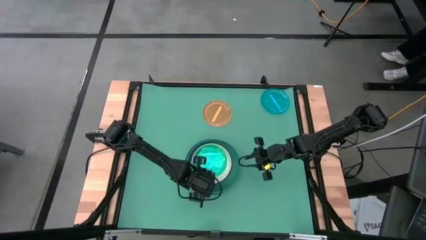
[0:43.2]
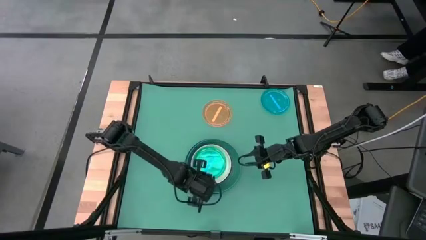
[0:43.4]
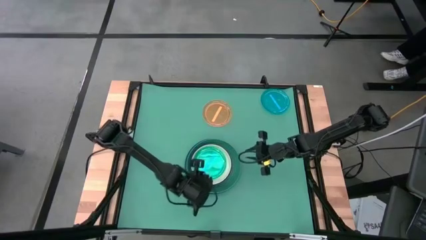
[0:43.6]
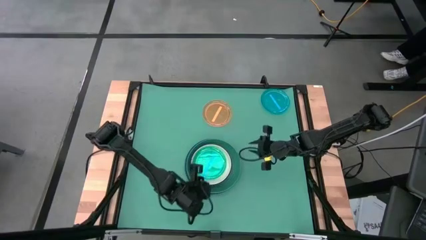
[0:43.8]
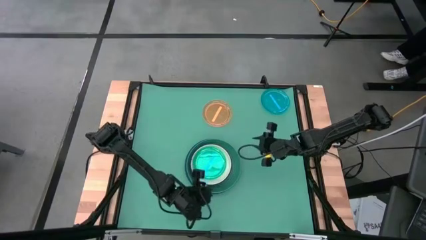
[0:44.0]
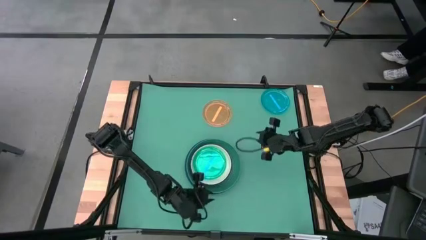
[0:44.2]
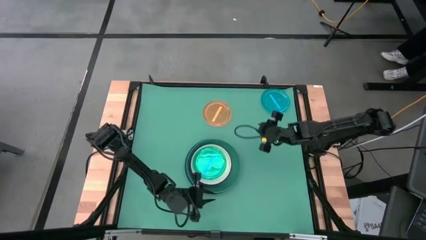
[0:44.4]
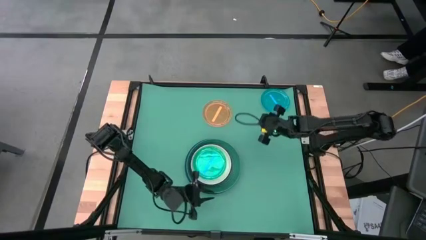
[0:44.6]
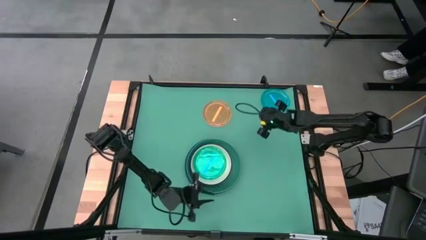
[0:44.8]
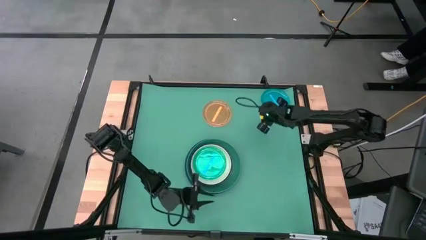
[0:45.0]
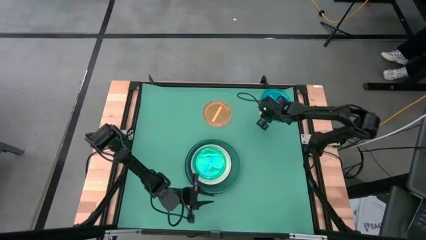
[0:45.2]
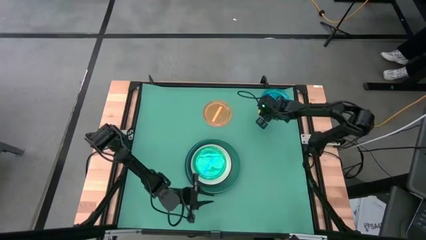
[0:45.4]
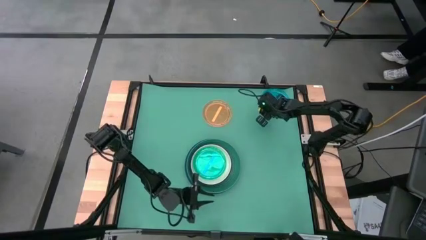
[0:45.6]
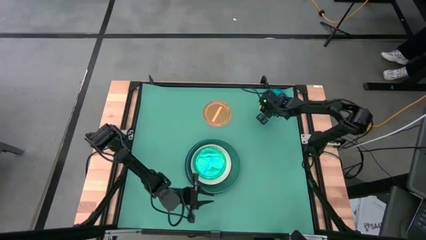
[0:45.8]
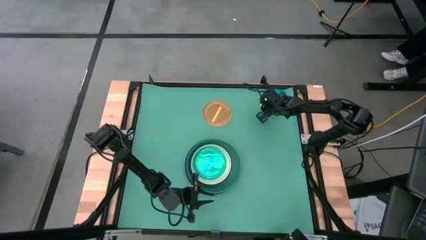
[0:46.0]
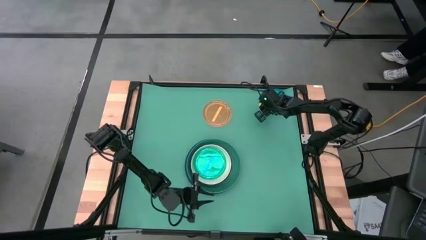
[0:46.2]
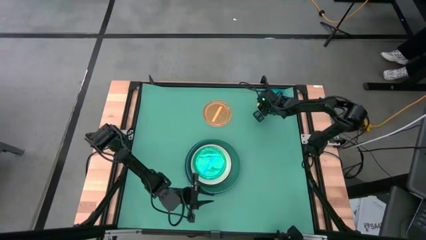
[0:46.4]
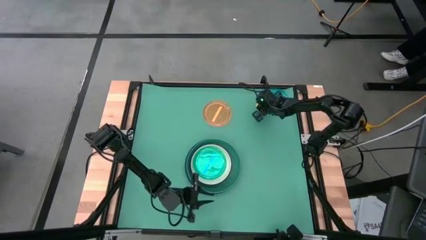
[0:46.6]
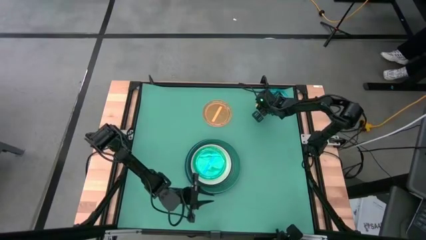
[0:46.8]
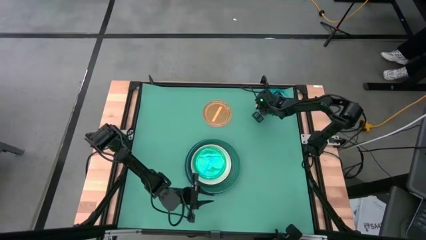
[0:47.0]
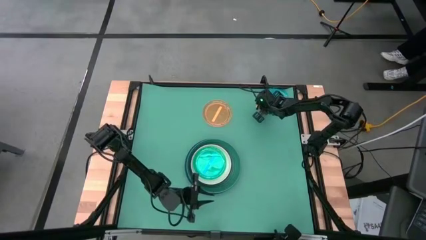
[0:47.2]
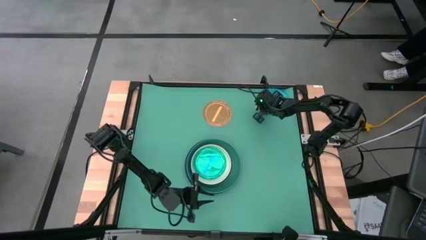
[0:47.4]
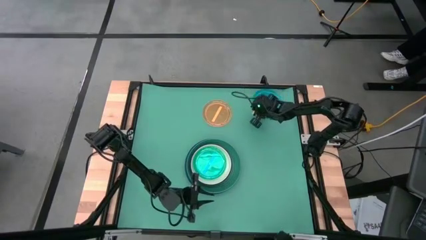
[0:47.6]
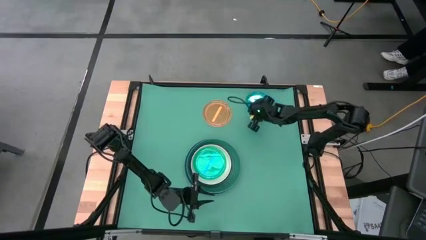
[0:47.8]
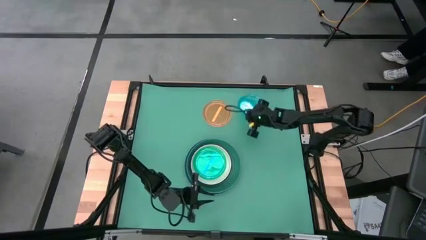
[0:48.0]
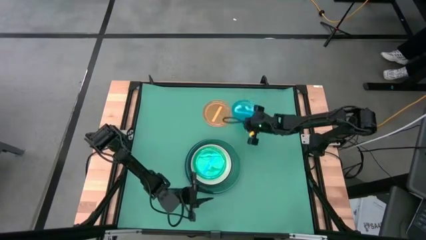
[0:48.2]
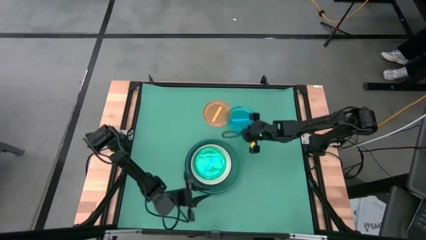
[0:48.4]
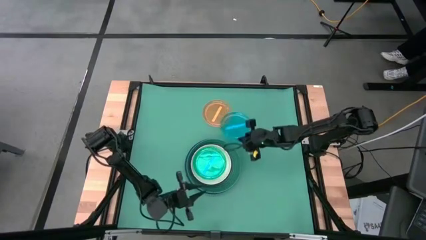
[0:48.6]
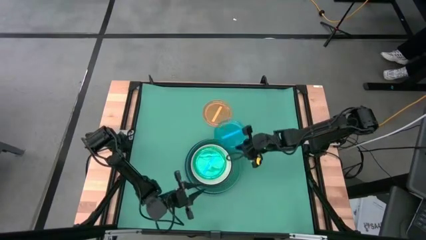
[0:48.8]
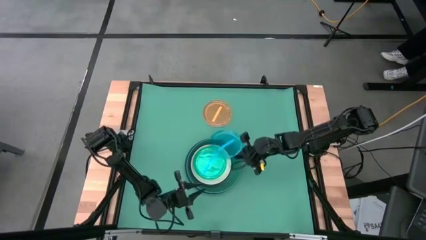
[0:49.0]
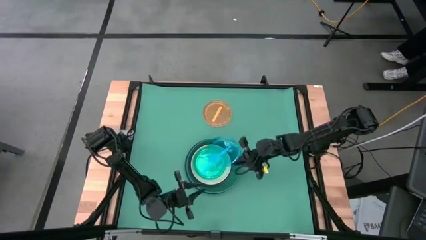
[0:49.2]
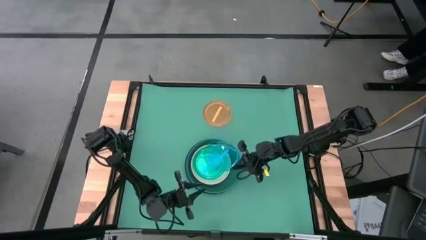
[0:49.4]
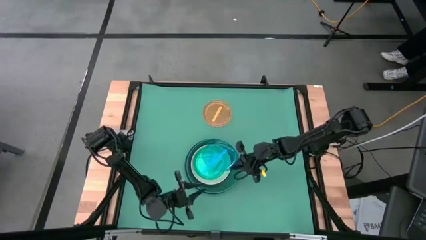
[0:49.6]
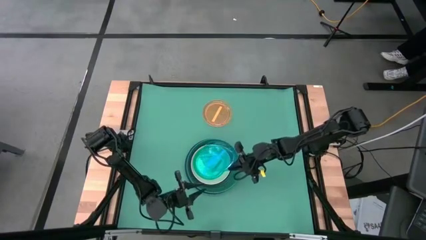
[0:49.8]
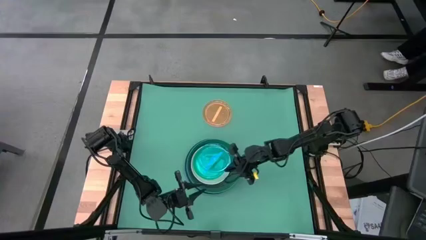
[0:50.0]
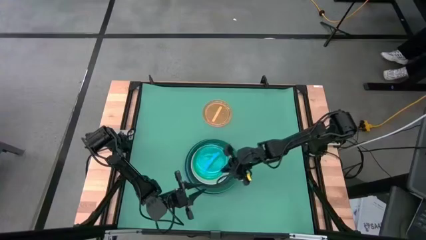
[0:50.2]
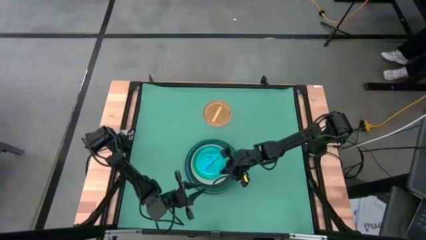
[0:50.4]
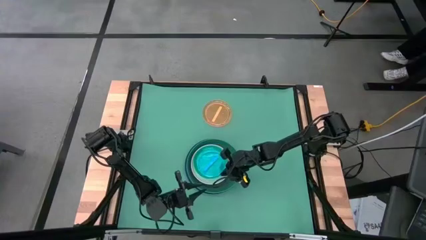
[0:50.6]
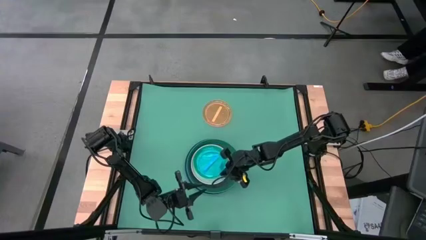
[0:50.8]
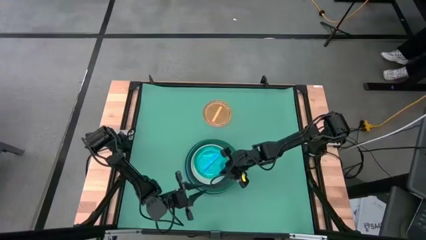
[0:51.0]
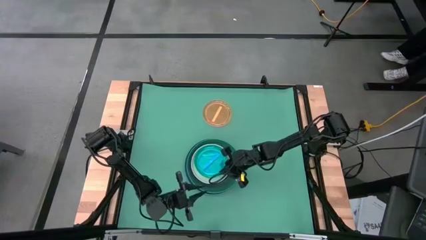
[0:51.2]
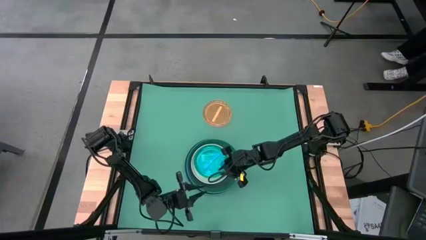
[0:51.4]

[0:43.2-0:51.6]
Task: Stack plastic plates
Stack the light blue plate on top of the light blue plate

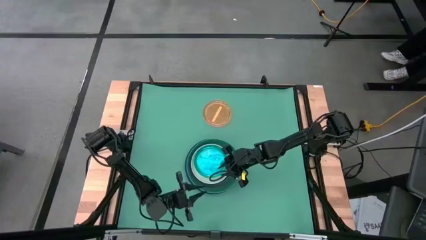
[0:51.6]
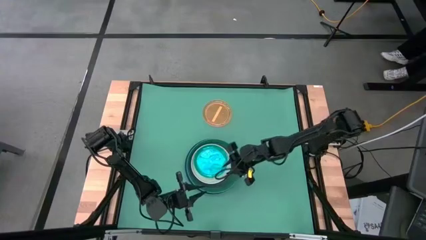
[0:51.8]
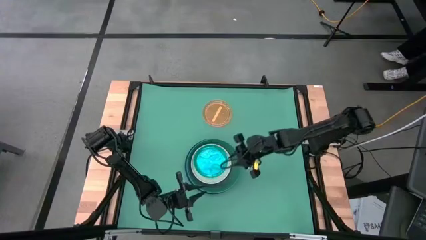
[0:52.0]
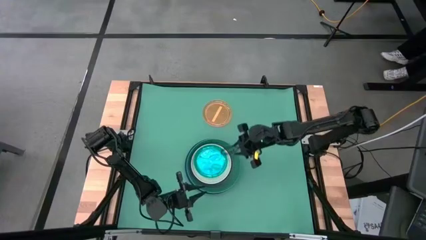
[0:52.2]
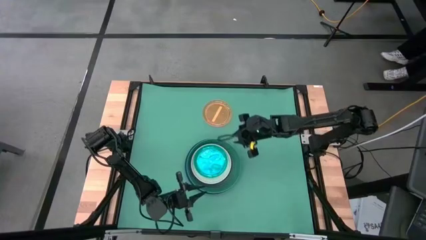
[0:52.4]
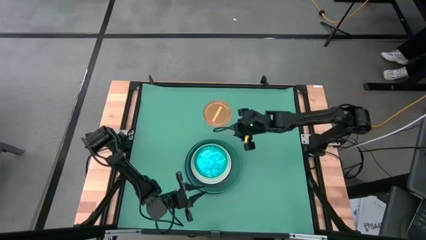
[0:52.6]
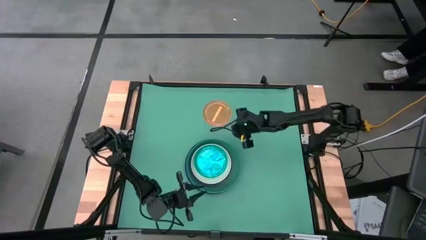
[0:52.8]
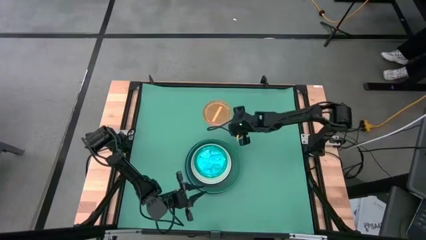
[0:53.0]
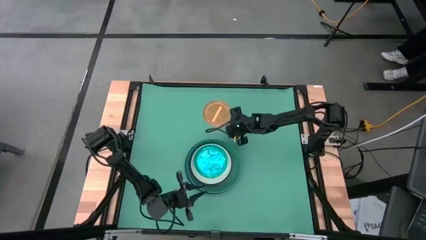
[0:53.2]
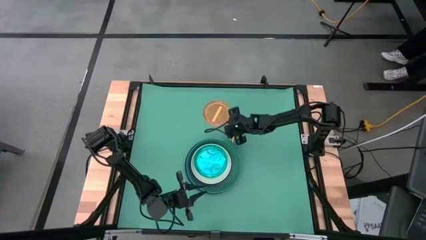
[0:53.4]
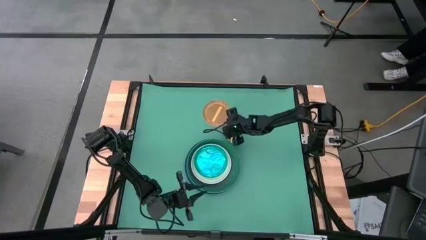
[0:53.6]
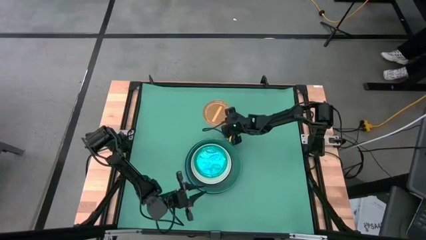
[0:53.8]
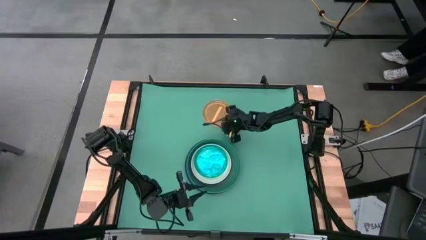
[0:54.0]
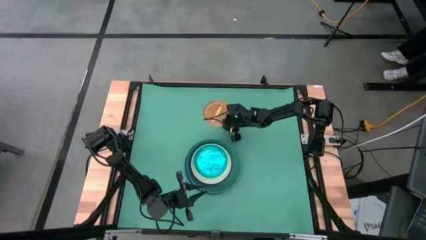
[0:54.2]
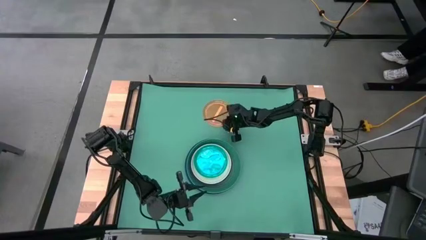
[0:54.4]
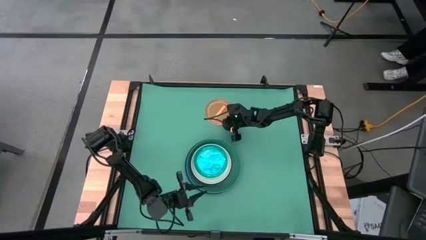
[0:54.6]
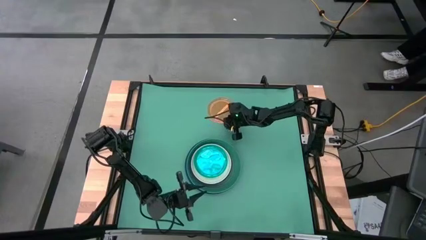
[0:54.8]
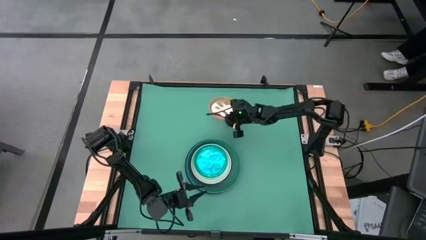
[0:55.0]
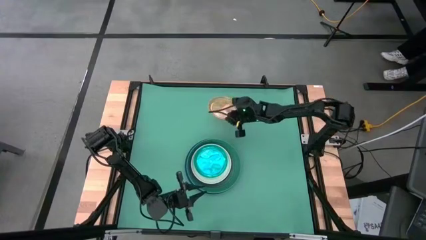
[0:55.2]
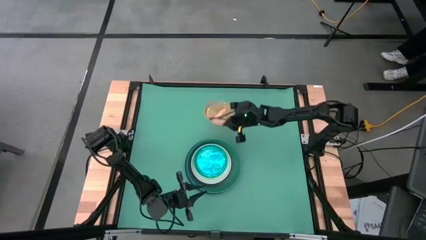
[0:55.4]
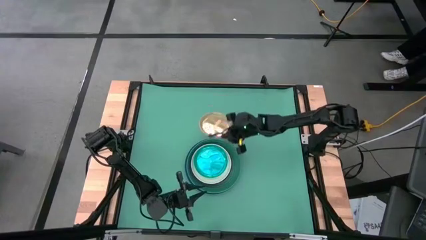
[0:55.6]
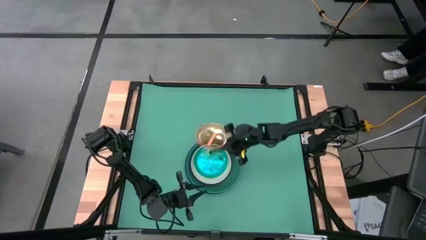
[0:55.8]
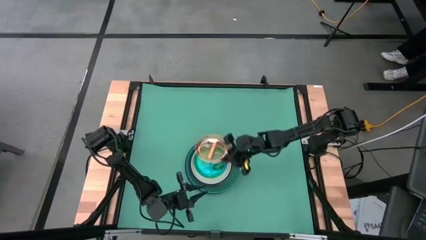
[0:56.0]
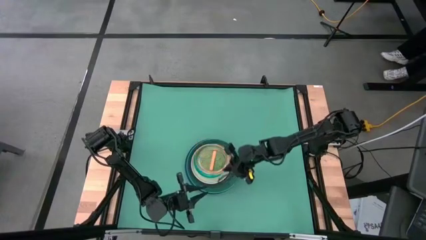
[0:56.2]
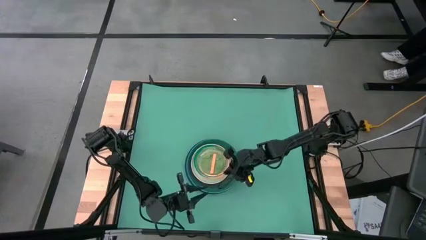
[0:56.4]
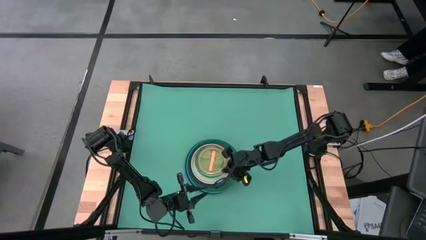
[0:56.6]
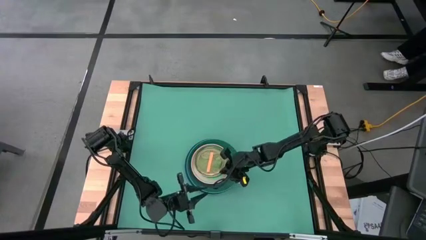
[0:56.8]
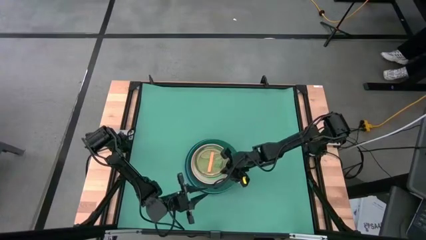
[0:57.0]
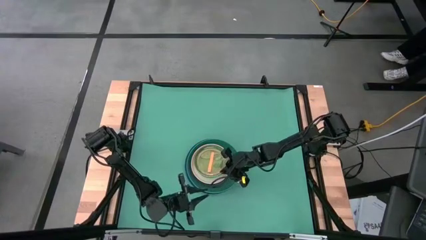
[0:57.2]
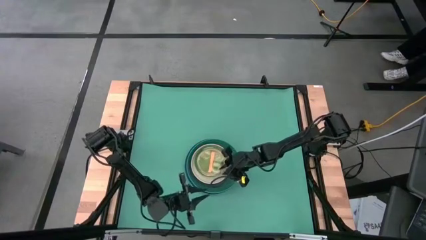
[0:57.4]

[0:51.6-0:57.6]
Stack the orange plate on top of the light blue plate
